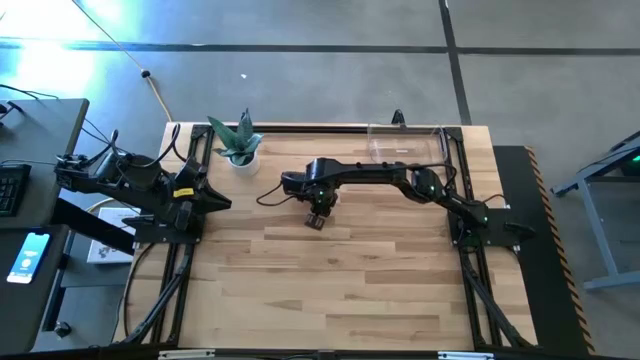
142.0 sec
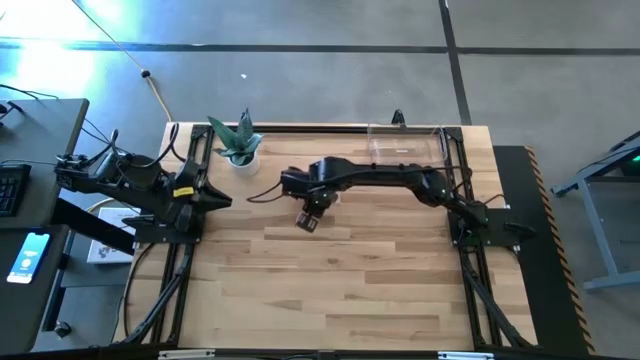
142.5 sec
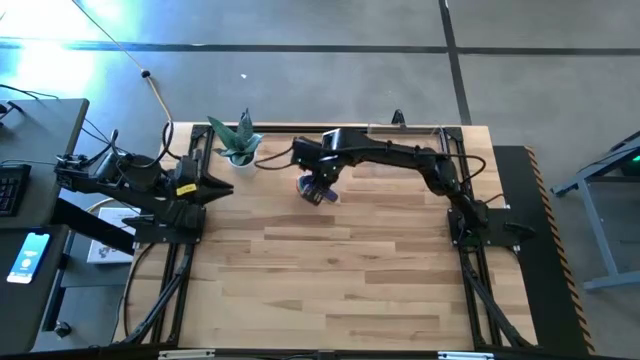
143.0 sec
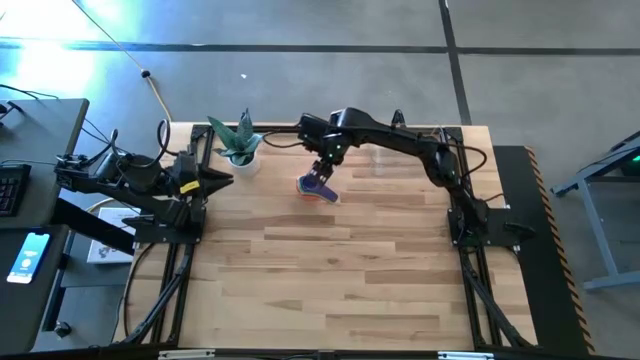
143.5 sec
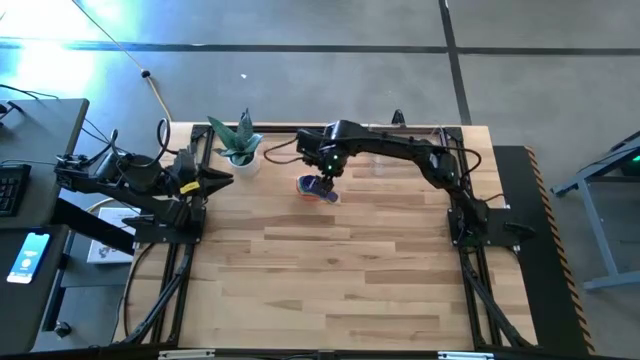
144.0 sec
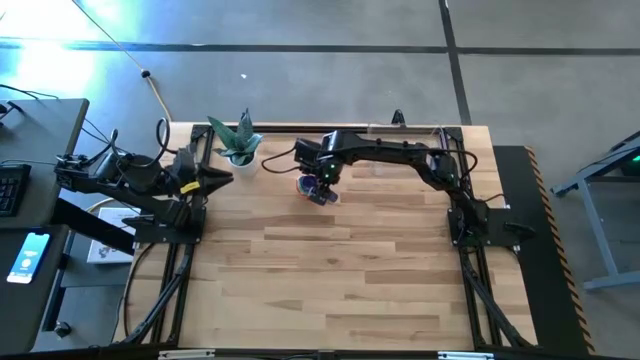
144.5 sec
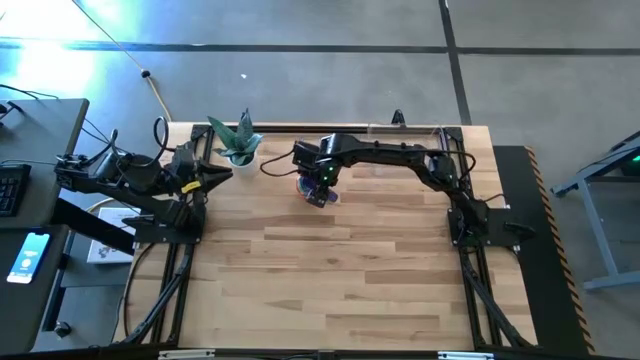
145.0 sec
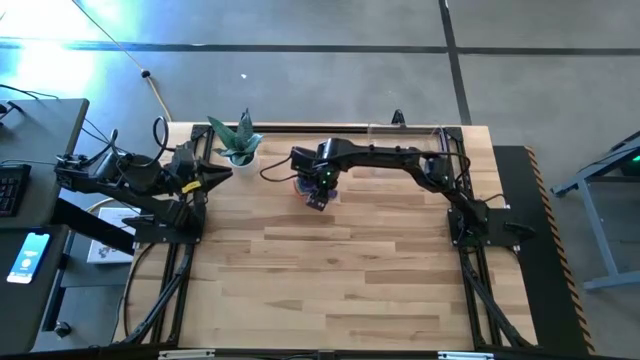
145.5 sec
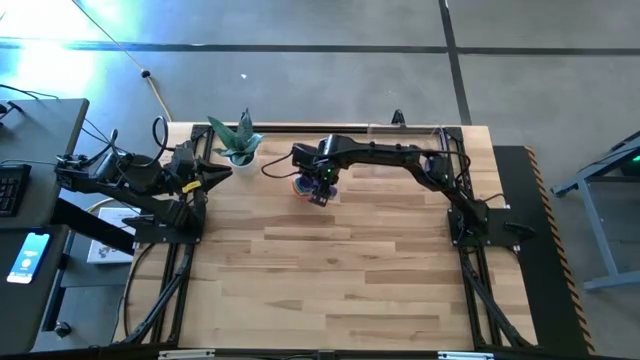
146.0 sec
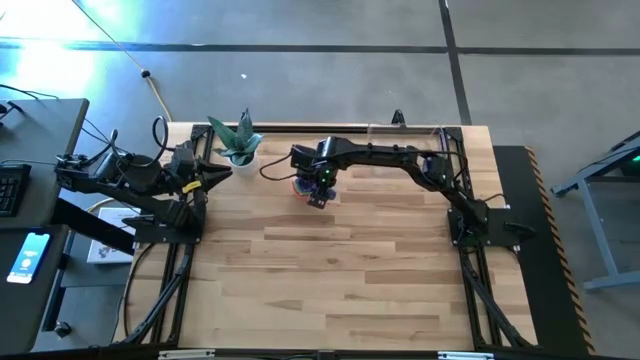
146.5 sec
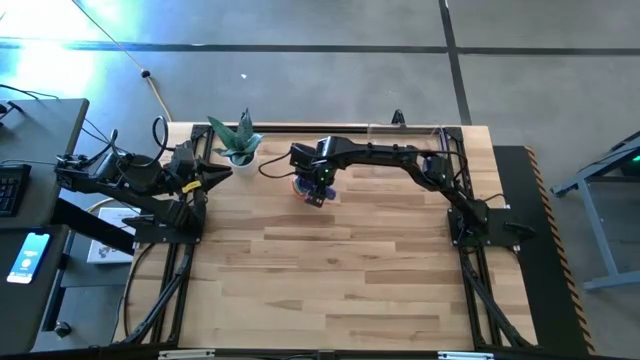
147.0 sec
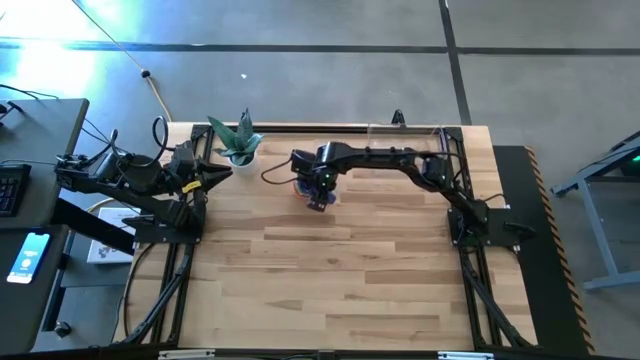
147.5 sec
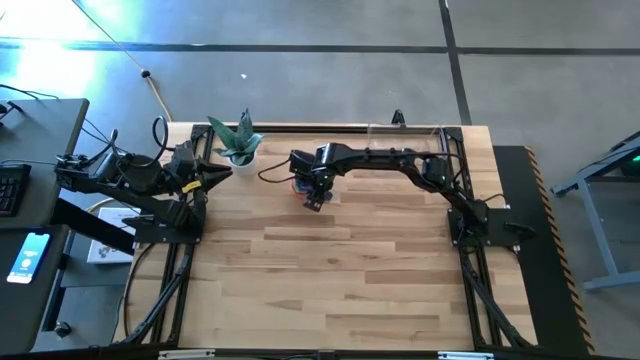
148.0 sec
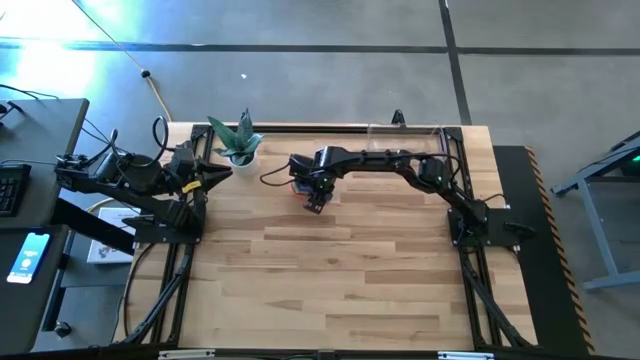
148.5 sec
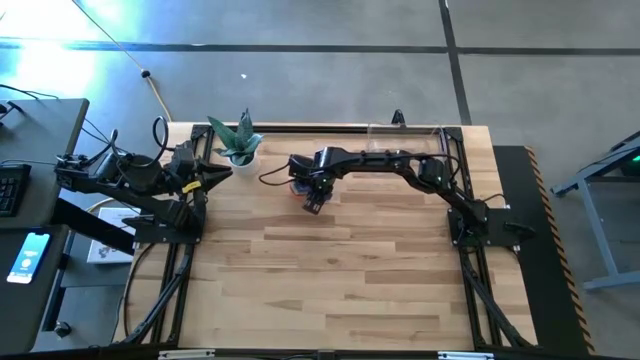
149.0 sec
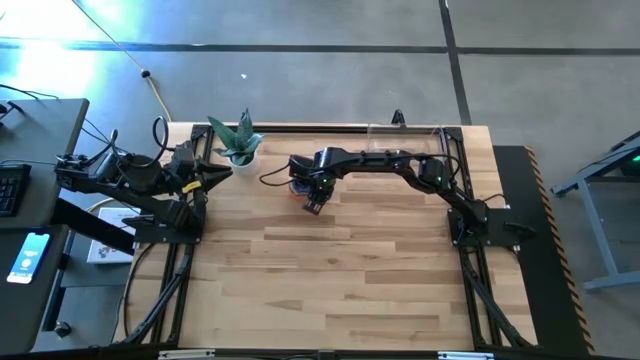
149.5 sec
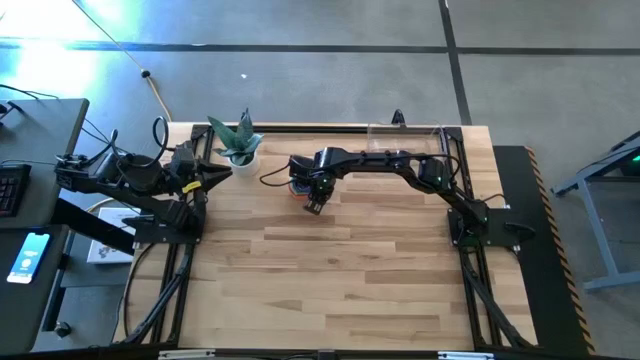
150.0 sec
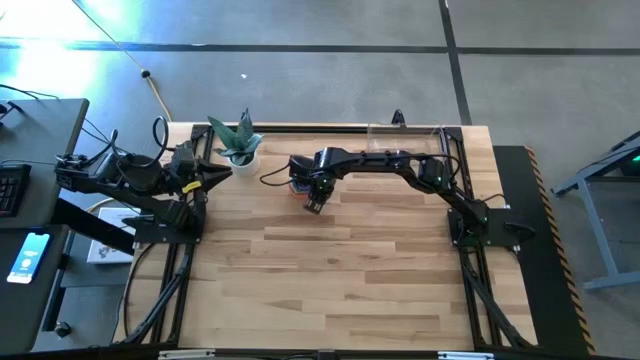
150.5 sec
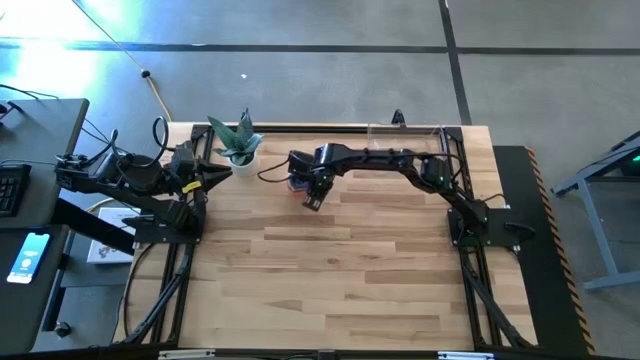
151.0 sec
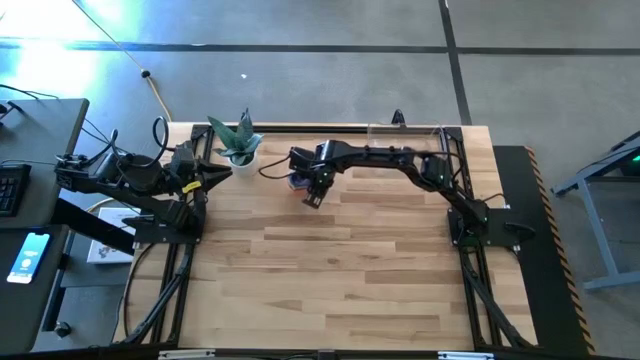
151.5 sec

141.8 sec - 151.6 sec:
Task: Nest measuring cups in basket
Put the measuring cups into the bin

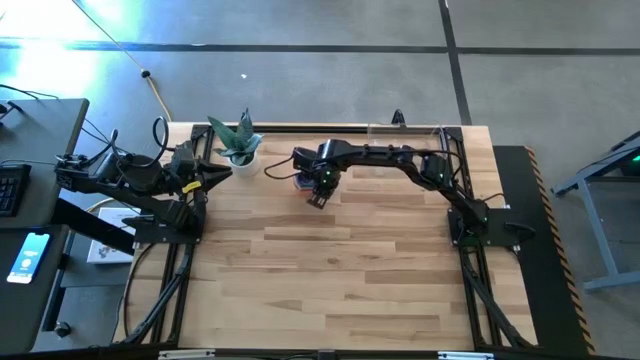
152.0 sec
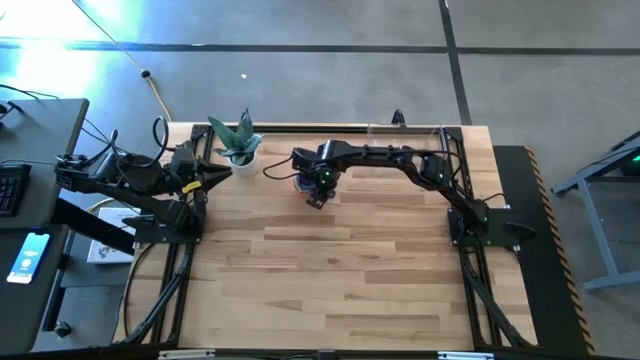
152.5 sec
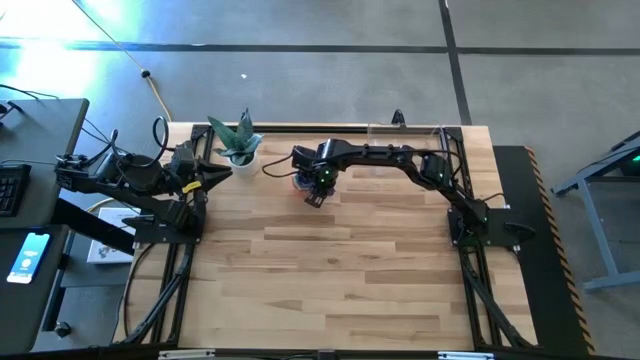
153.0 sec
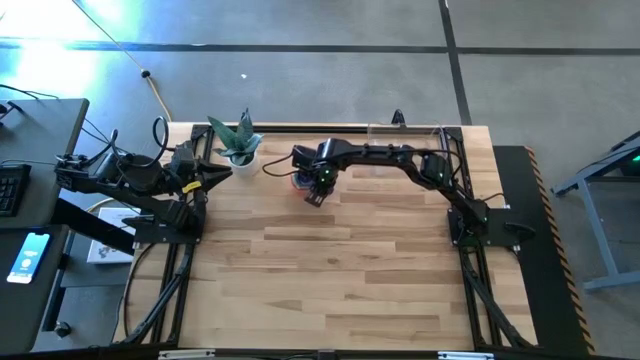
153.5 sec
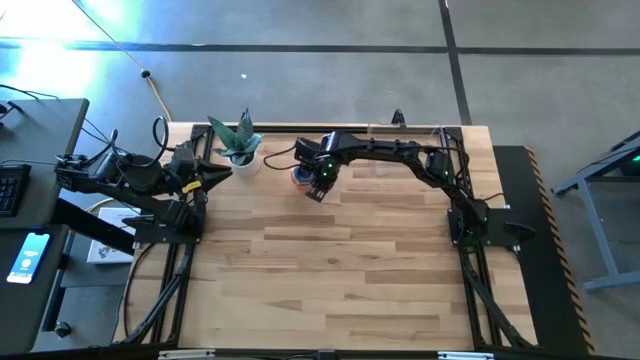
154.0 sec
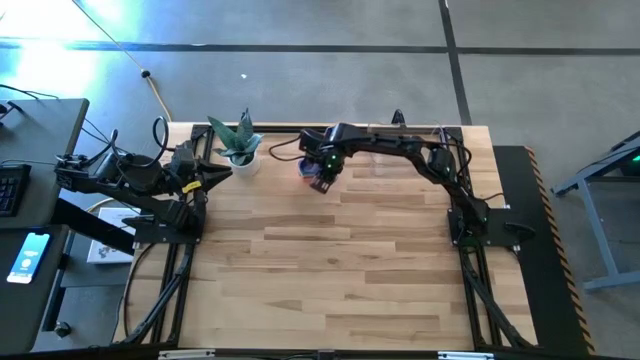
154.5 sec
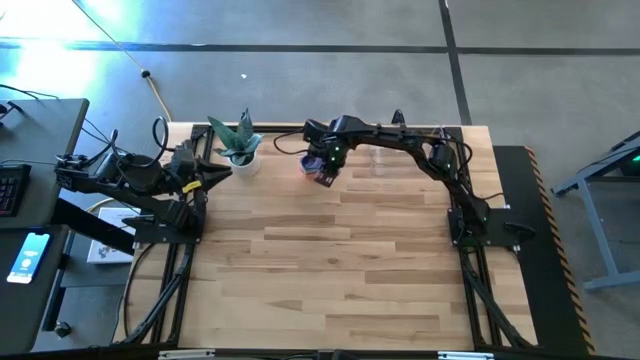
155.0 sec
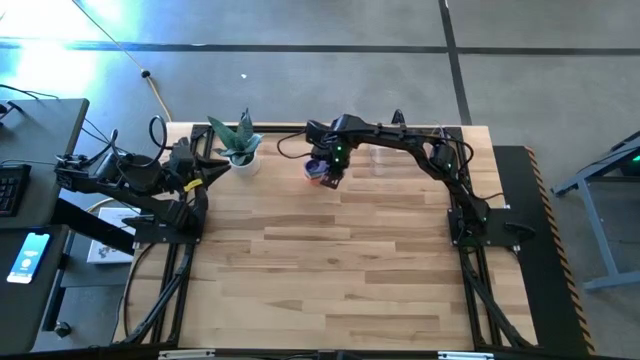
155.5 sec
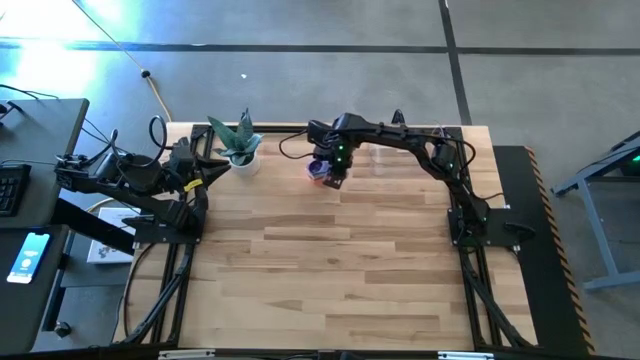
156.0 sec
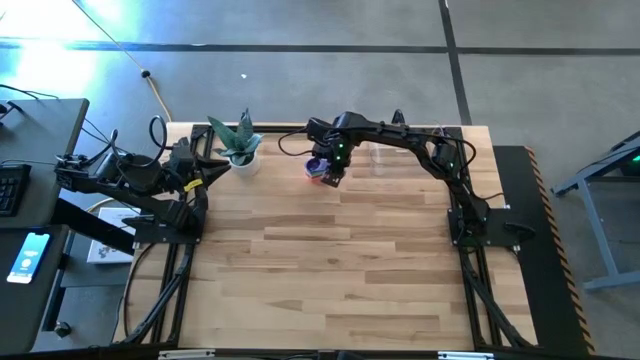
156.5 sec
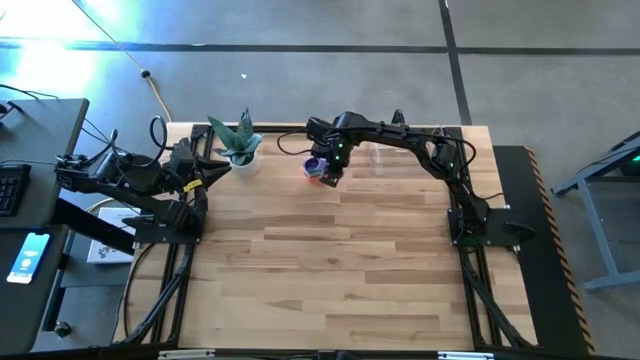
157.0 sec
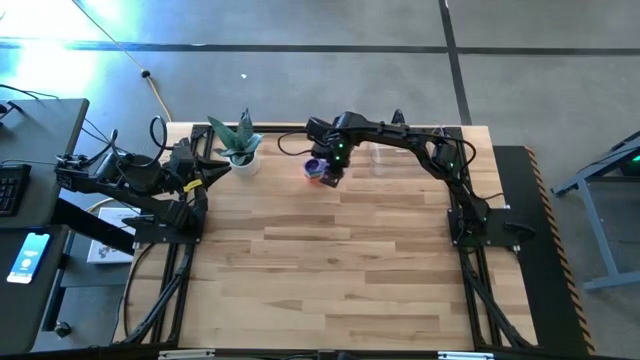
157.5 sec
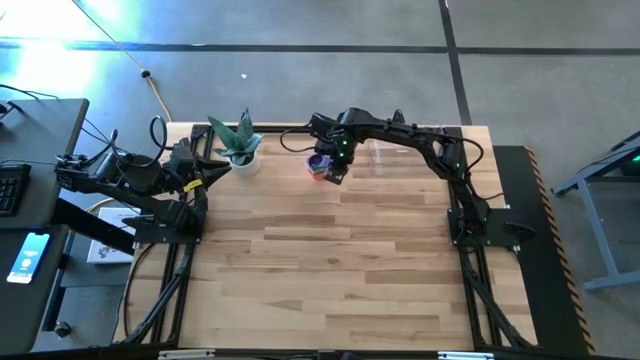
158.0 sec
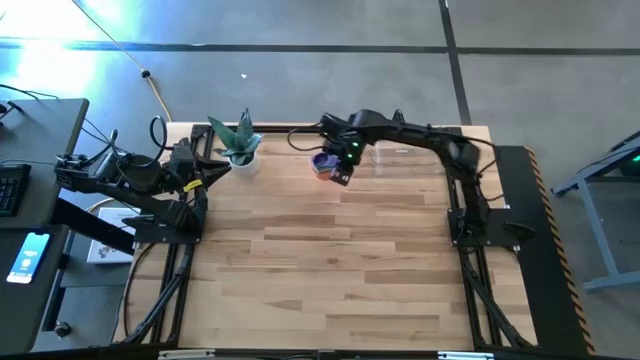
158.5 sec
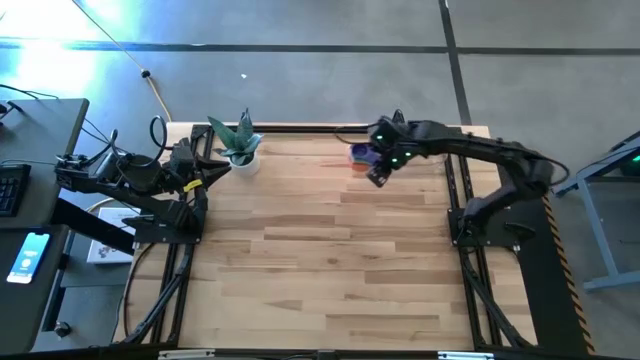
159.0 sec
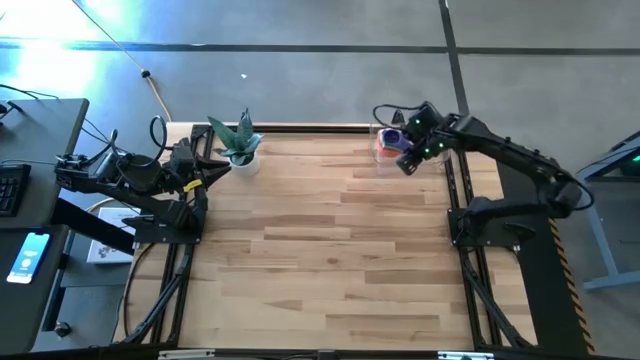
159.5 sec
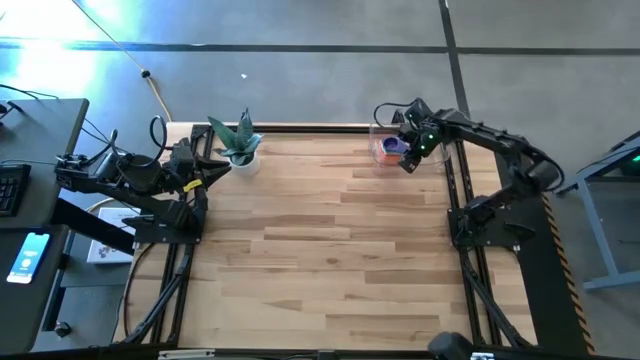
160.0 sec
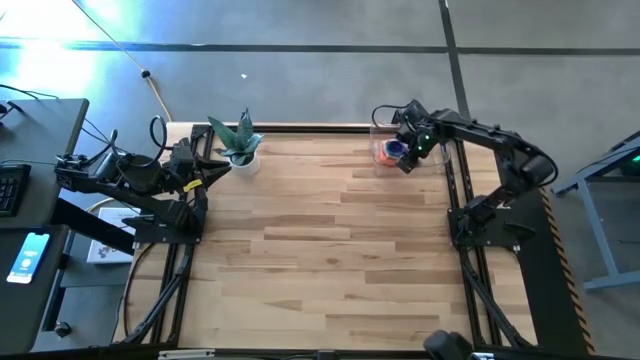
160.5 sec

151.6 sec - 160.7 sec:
Put the measuring cups into the bin
